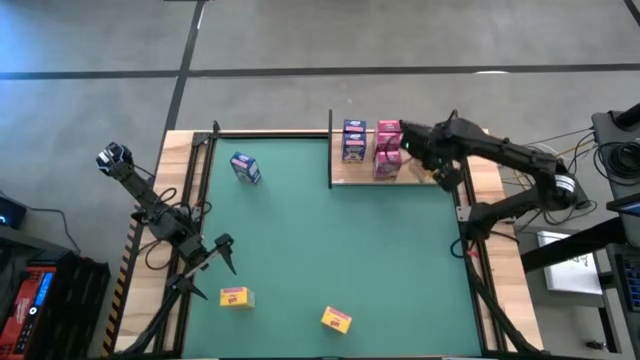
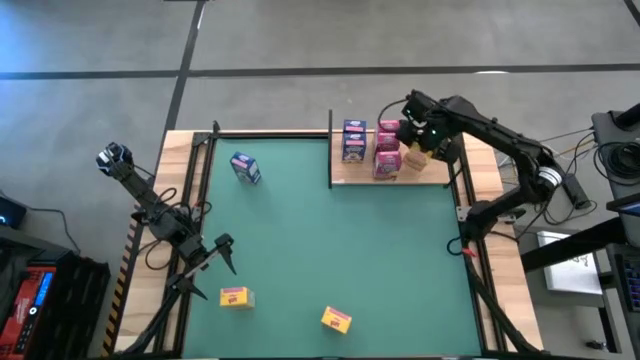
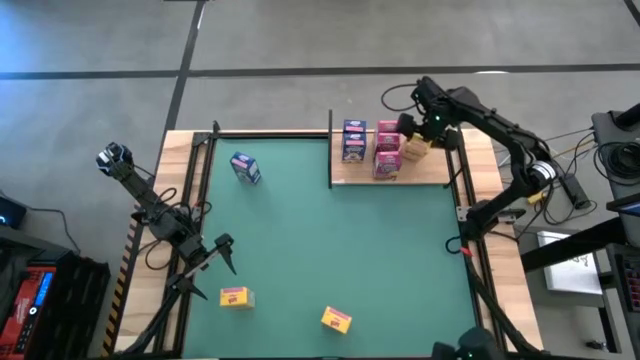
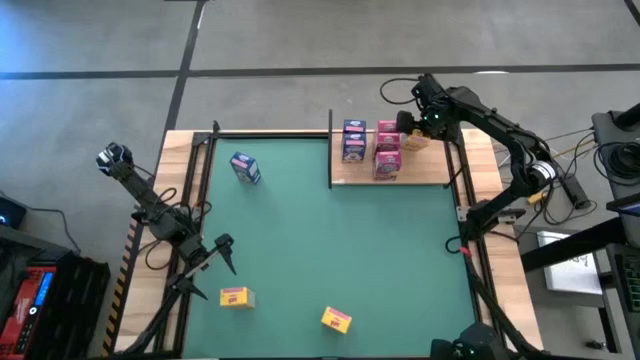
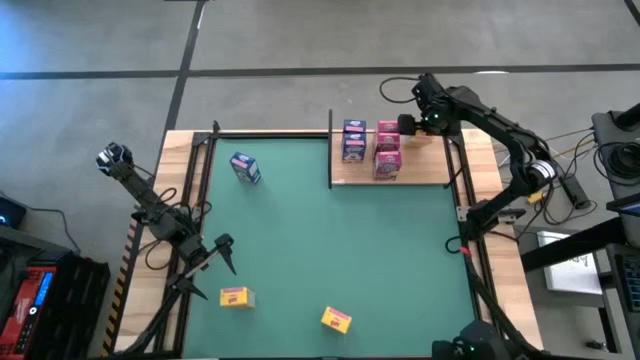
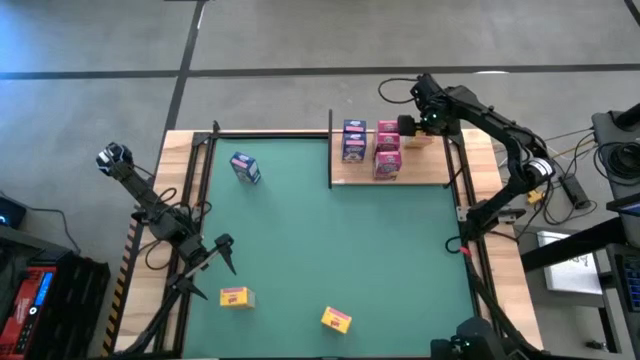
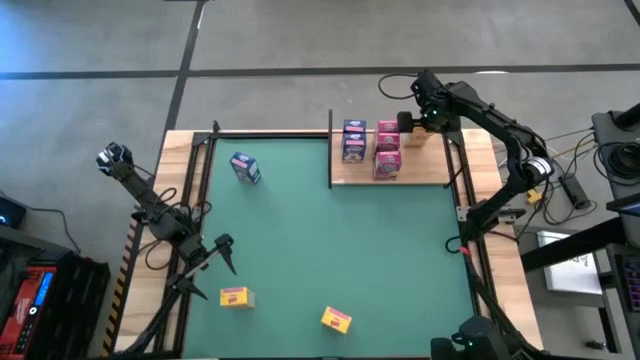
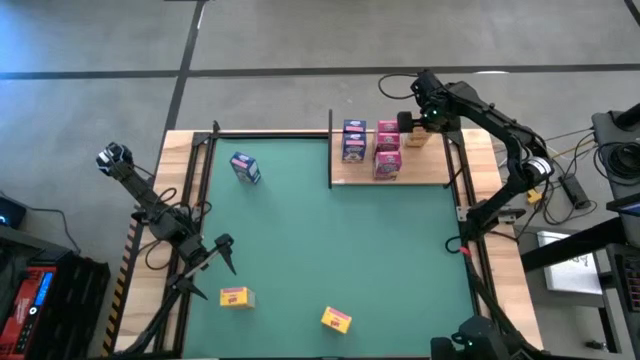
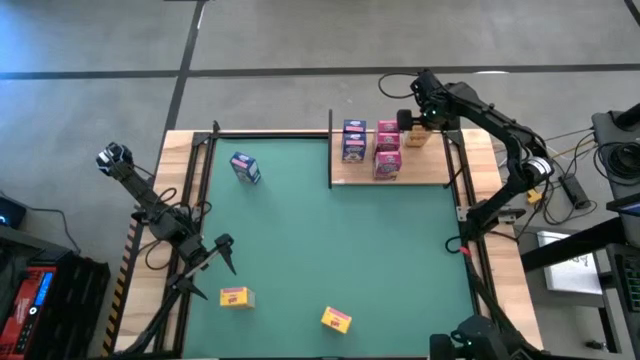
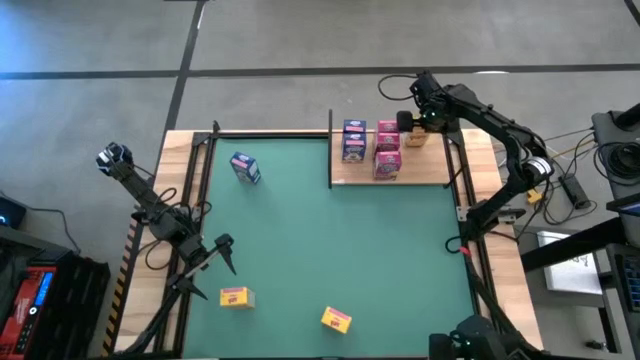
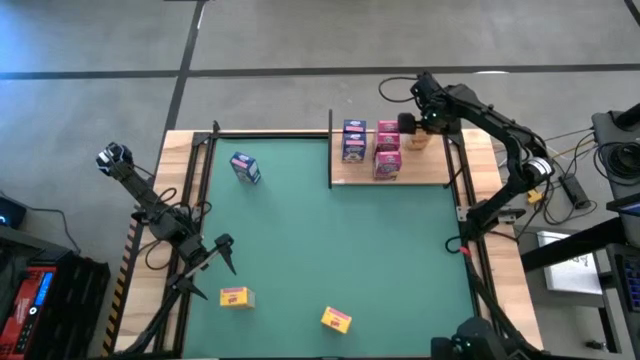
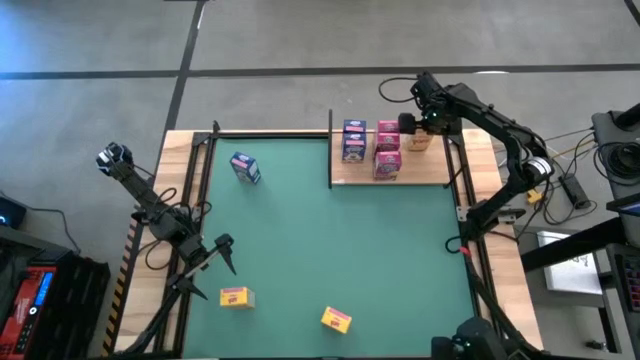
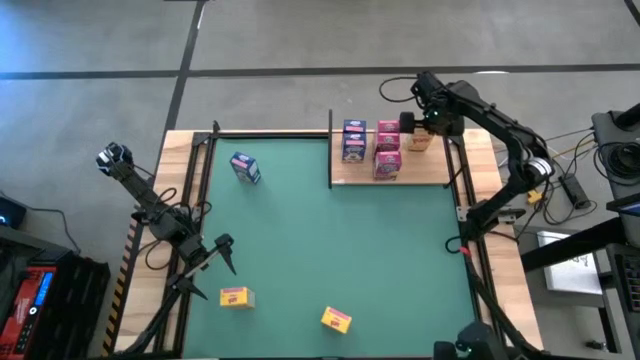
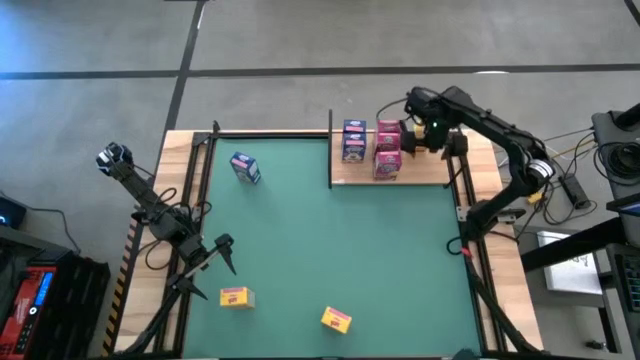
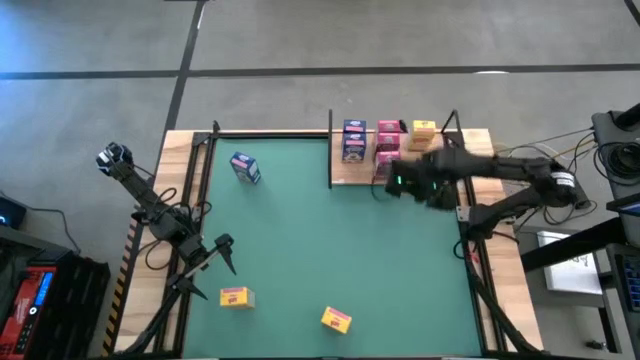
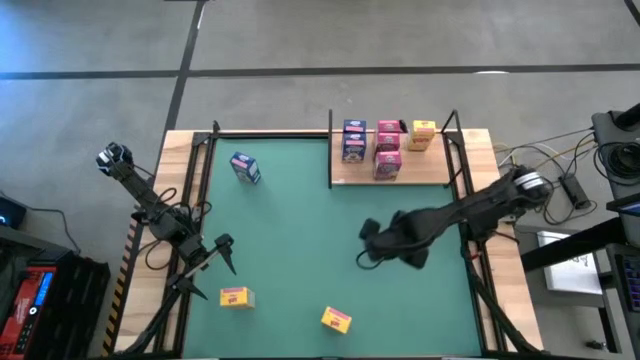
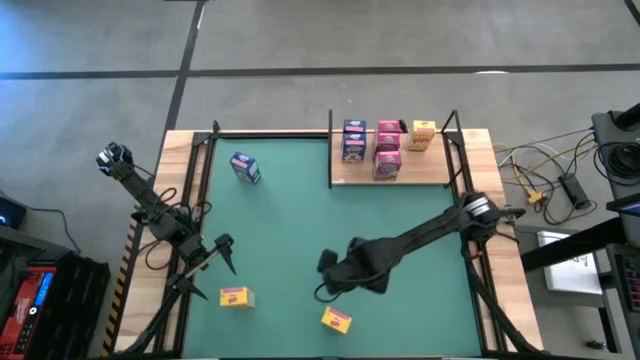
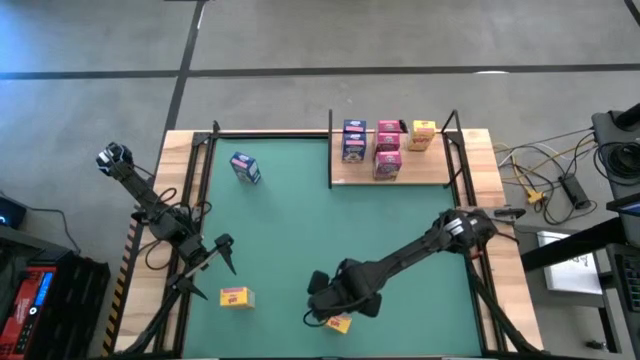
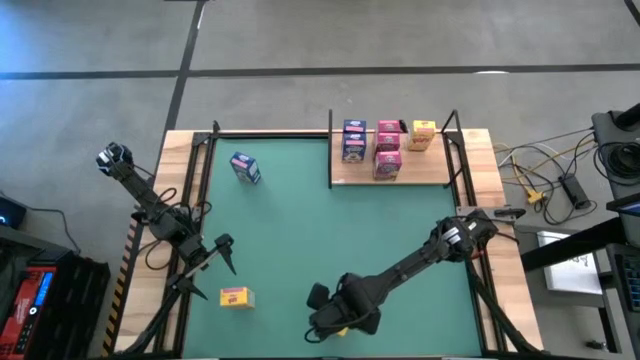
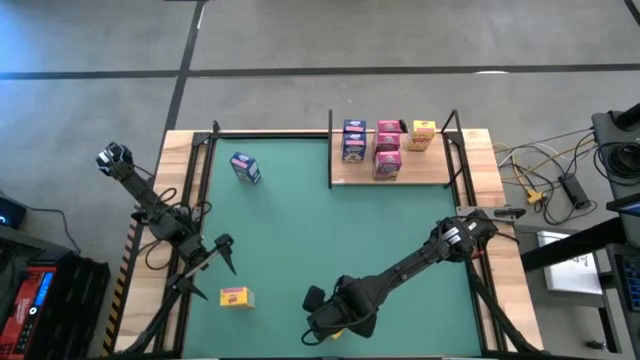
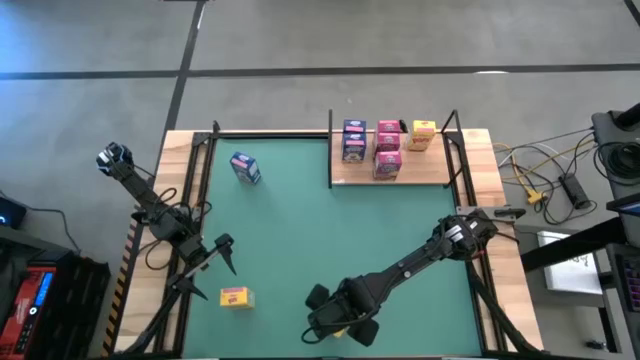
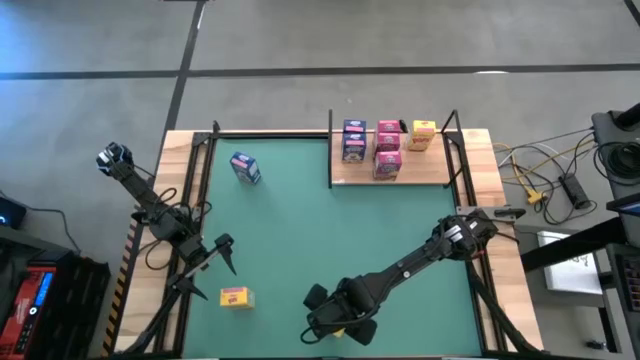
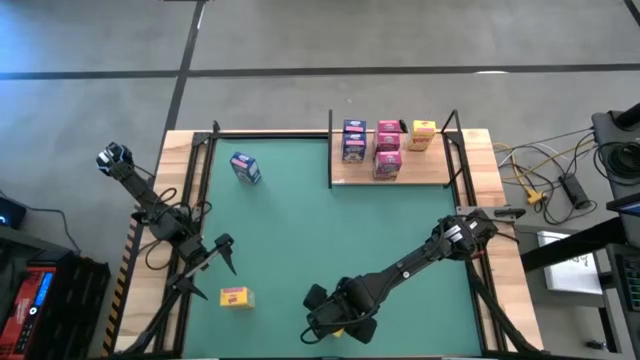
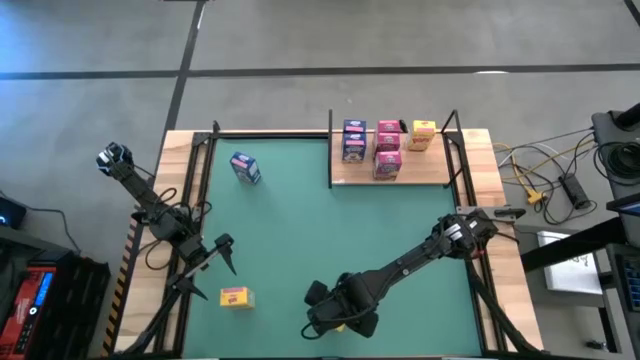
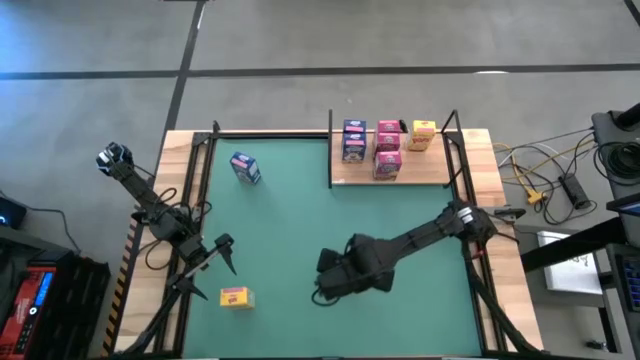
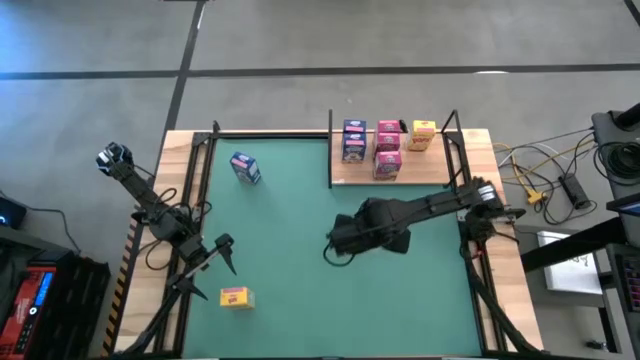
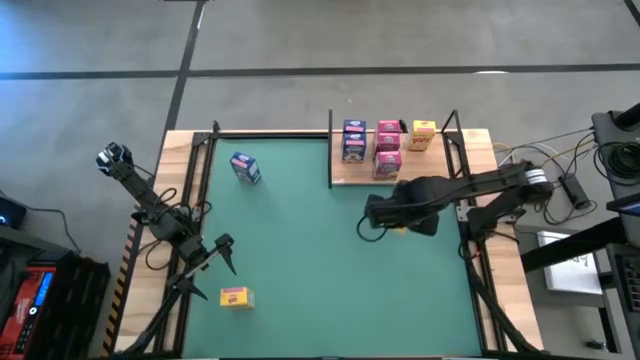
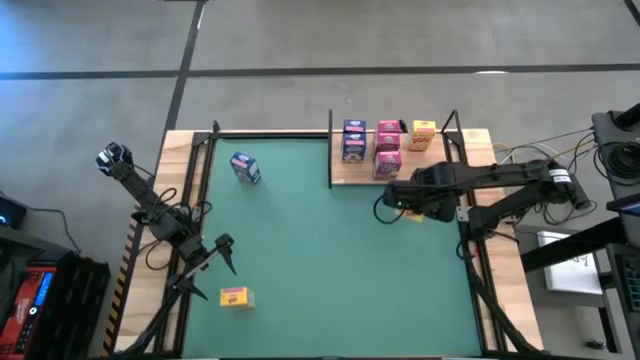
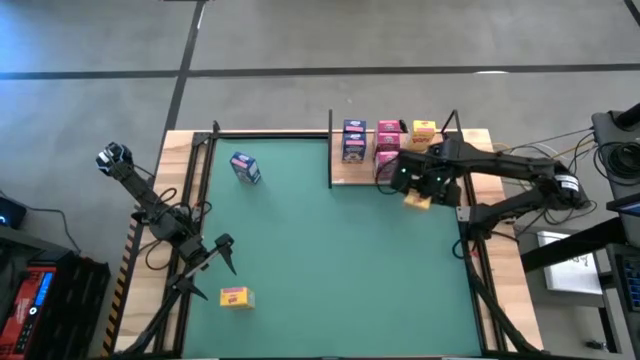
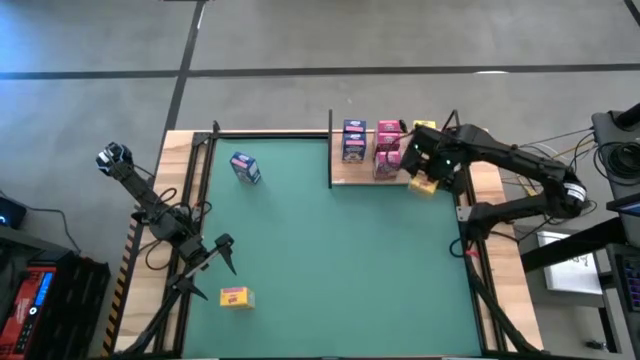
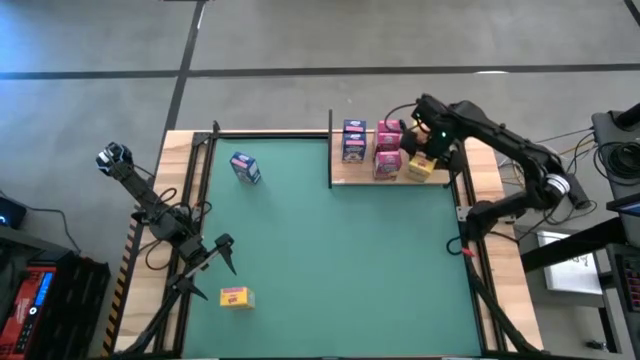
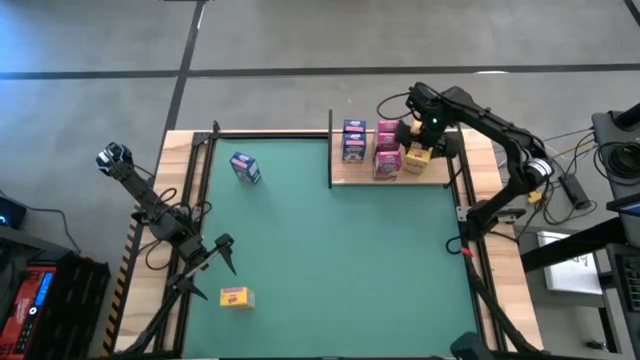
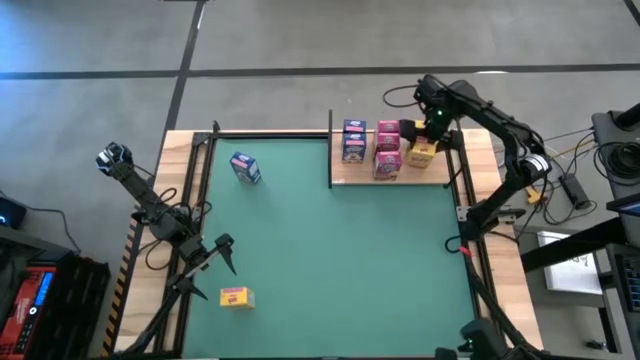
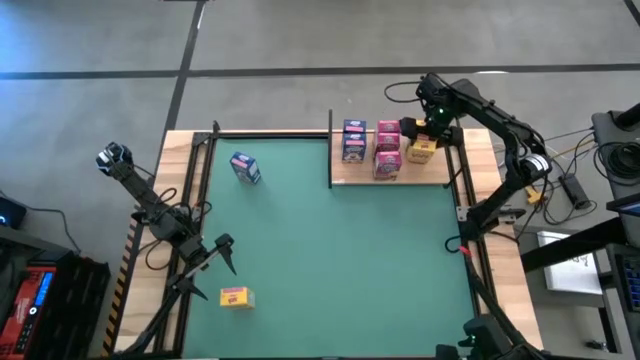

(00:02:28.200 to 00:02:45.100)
Task: Stack cereal on shelf
Put the right yellow cereal box onto the shelf

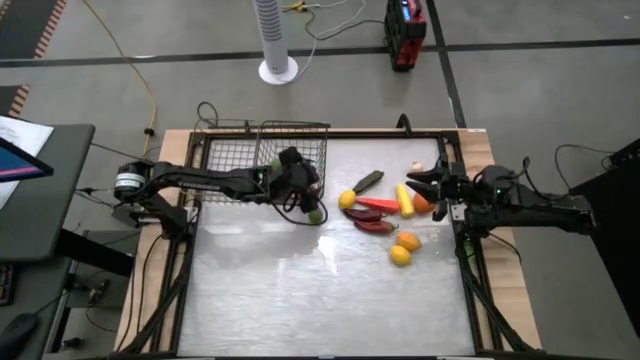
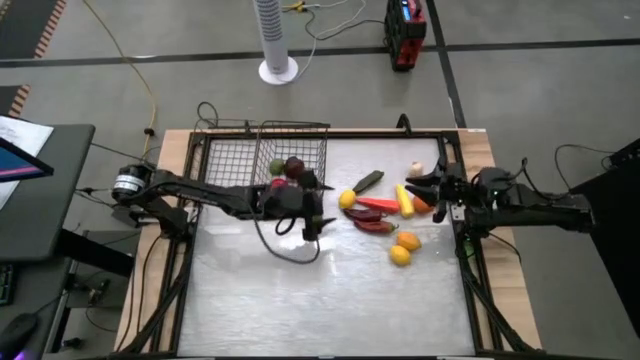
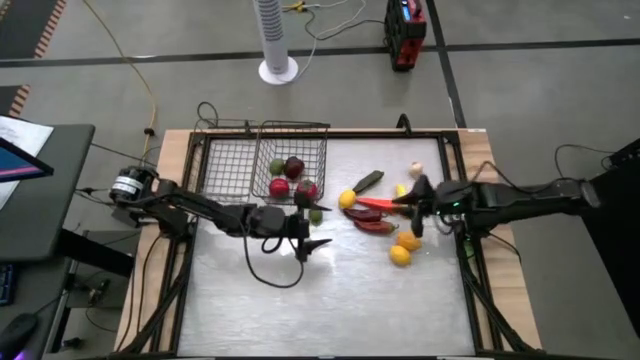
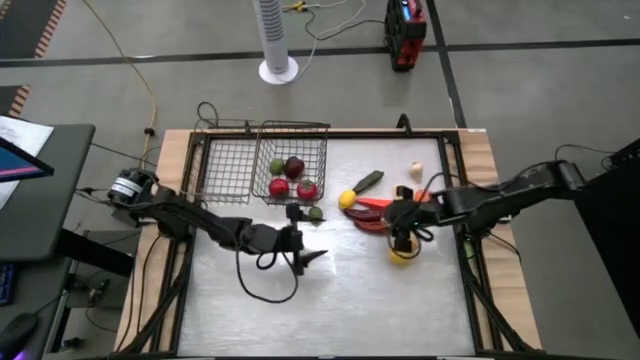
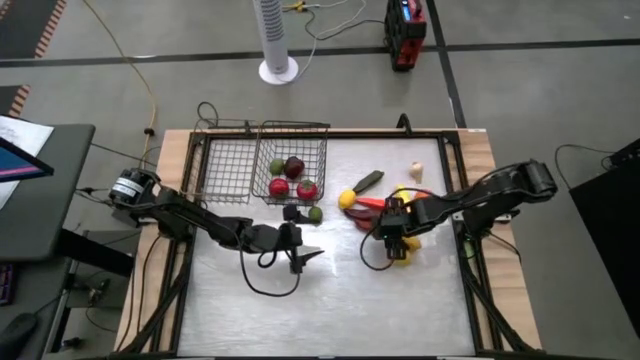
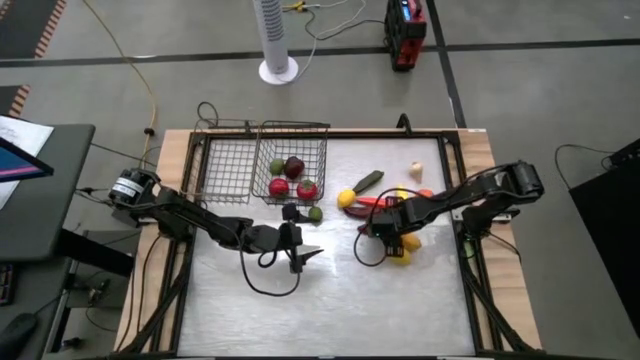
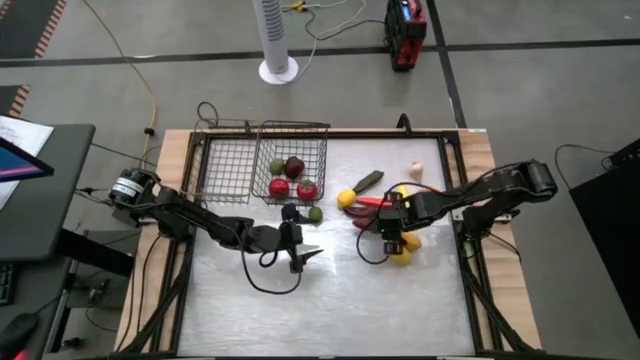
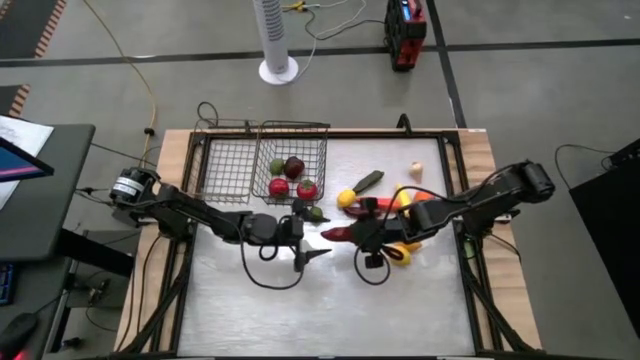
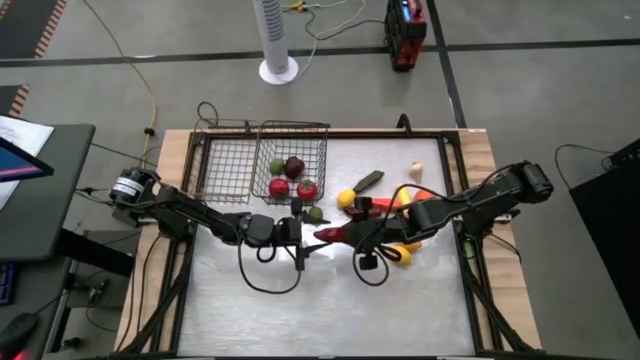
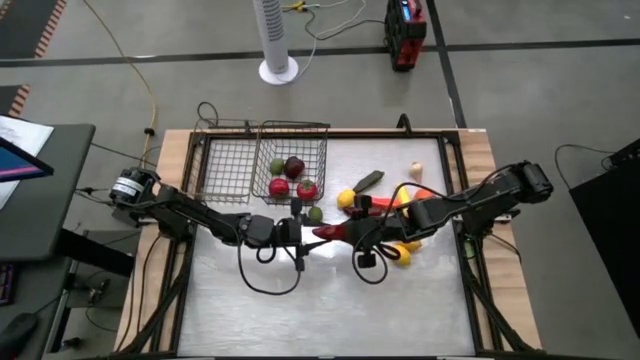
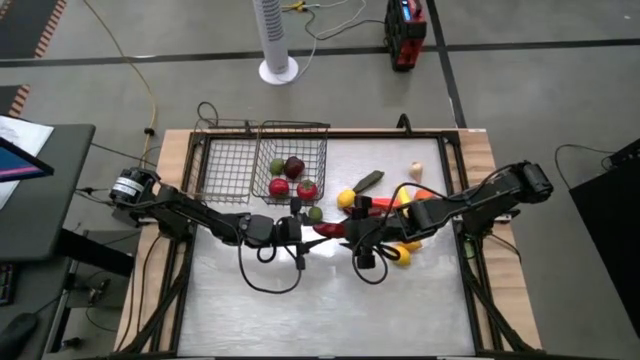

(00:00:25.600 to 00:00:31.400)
Task: Sort produce into baskets
Put the bottom red chili pepper into the left wire basket
